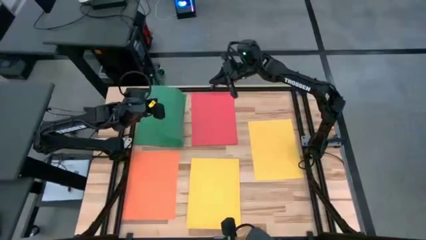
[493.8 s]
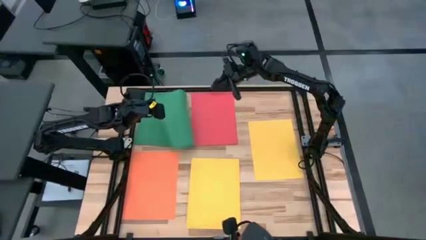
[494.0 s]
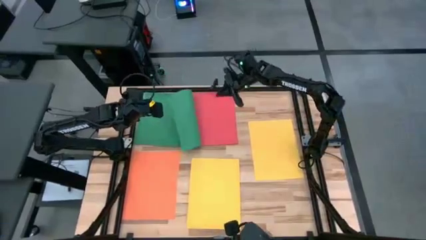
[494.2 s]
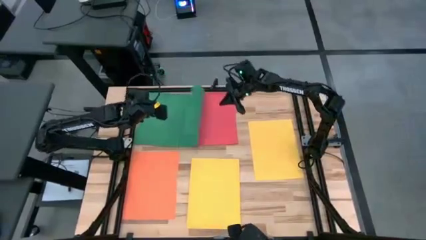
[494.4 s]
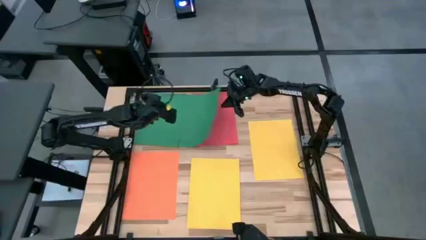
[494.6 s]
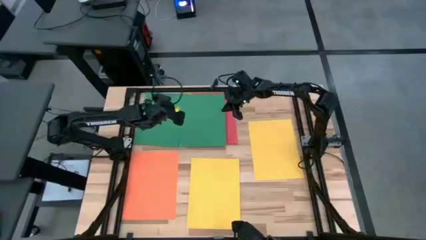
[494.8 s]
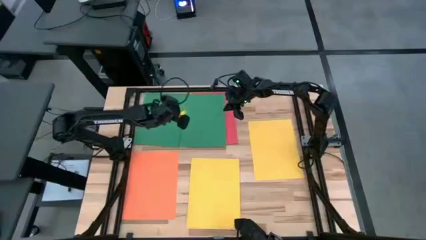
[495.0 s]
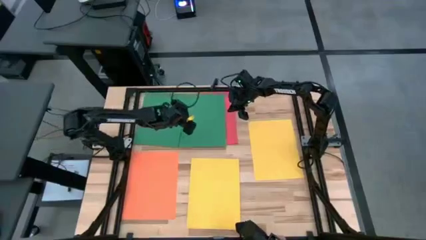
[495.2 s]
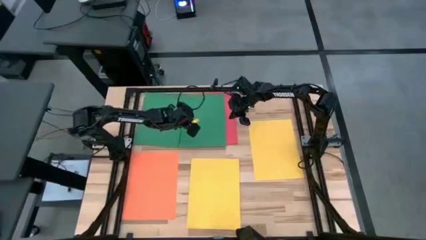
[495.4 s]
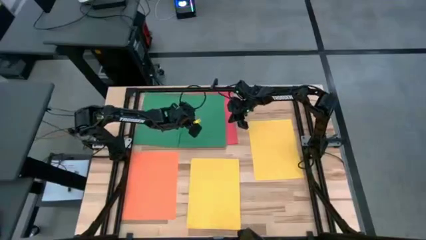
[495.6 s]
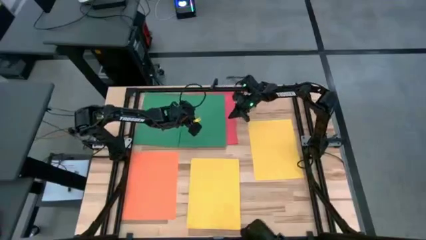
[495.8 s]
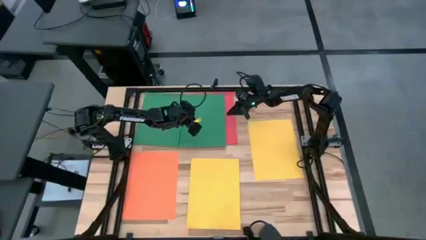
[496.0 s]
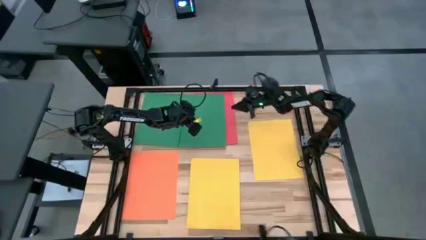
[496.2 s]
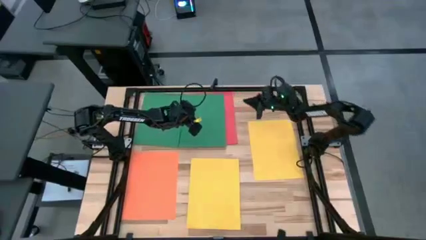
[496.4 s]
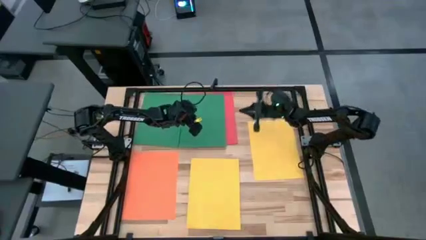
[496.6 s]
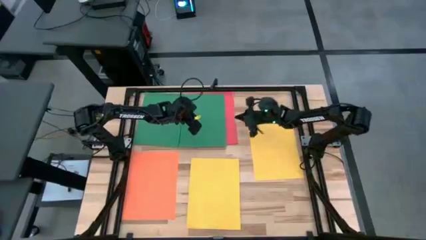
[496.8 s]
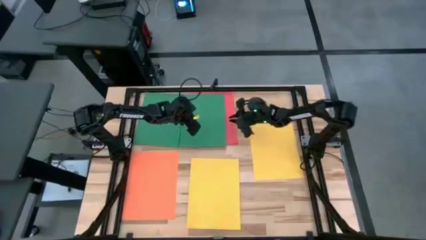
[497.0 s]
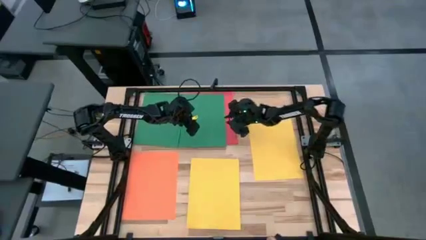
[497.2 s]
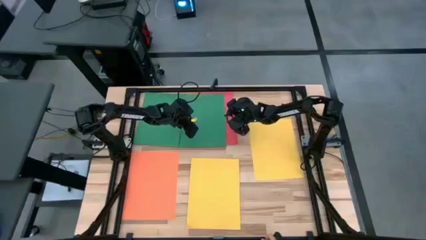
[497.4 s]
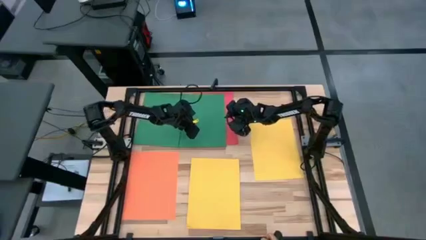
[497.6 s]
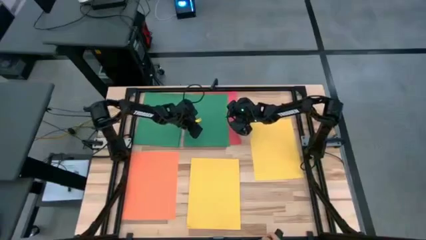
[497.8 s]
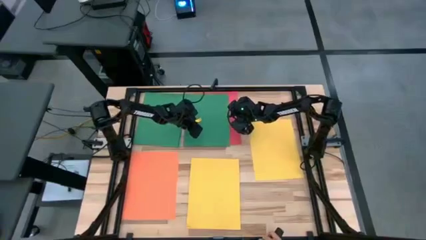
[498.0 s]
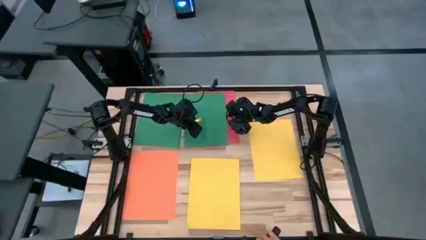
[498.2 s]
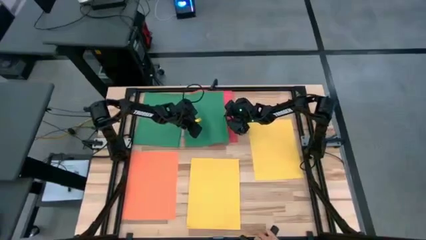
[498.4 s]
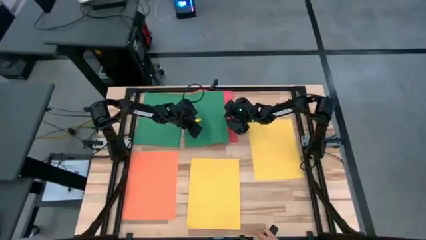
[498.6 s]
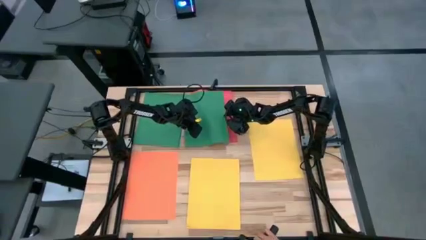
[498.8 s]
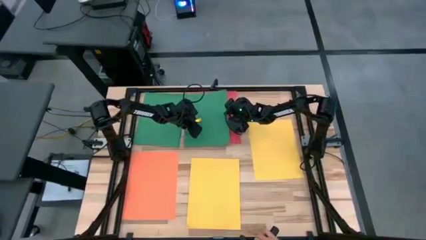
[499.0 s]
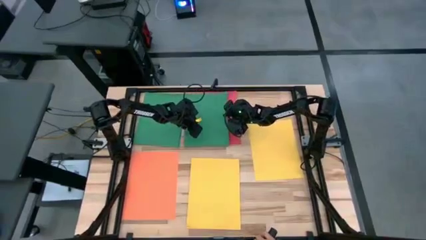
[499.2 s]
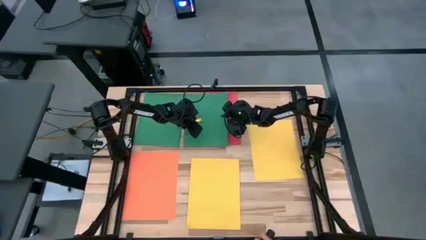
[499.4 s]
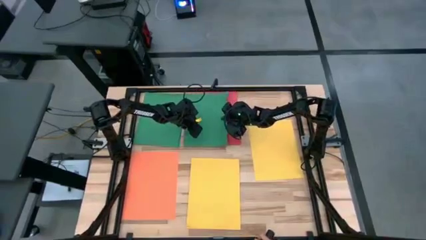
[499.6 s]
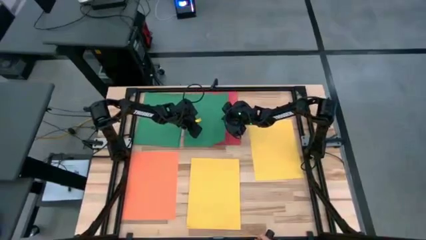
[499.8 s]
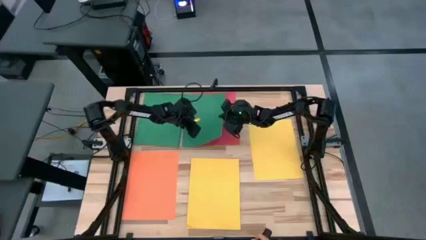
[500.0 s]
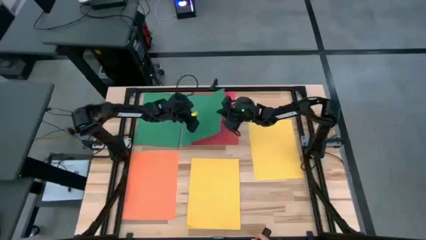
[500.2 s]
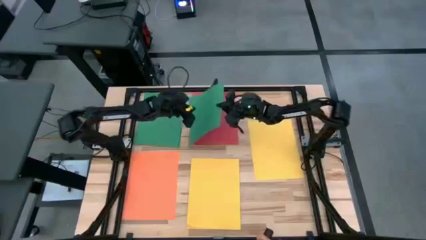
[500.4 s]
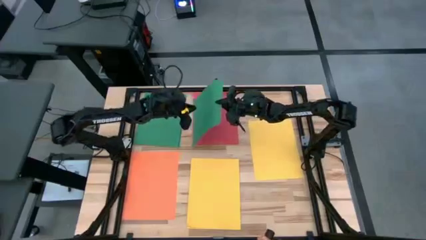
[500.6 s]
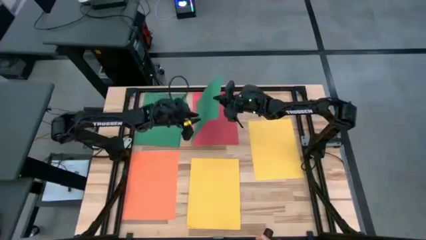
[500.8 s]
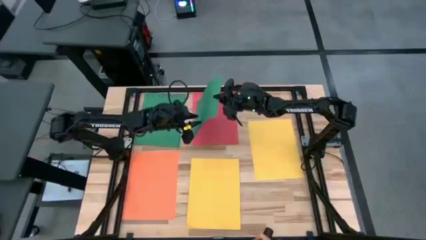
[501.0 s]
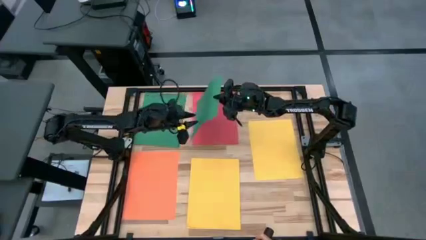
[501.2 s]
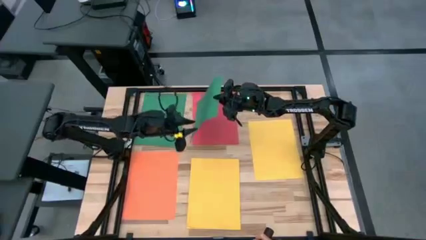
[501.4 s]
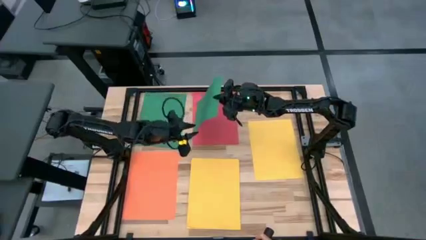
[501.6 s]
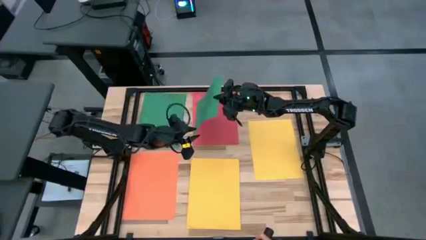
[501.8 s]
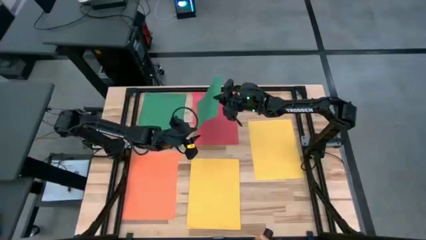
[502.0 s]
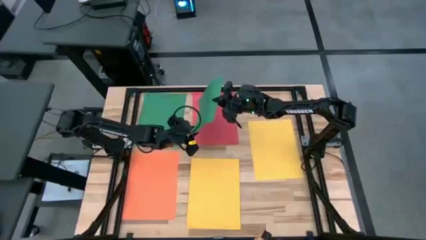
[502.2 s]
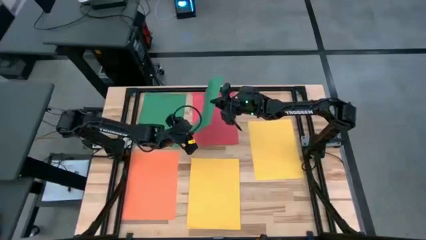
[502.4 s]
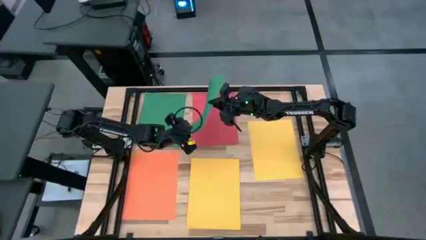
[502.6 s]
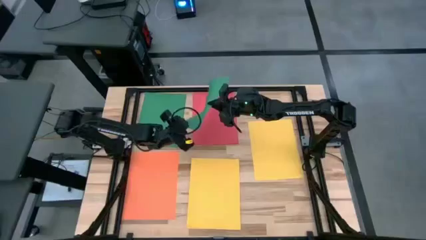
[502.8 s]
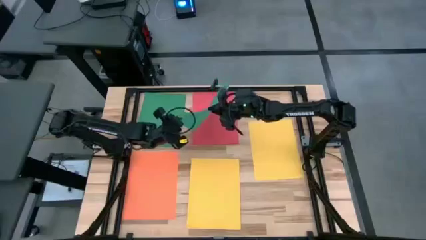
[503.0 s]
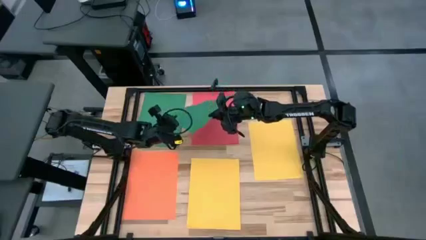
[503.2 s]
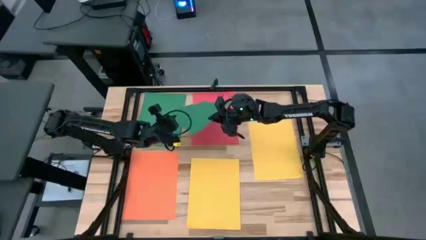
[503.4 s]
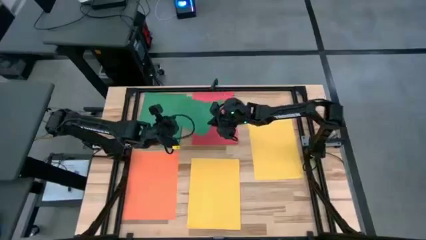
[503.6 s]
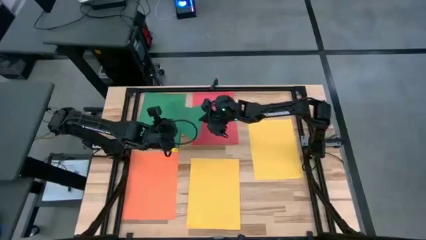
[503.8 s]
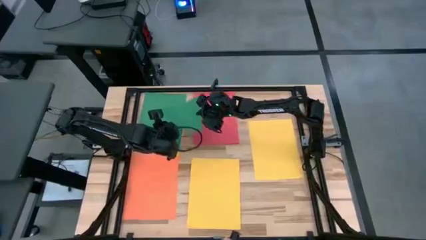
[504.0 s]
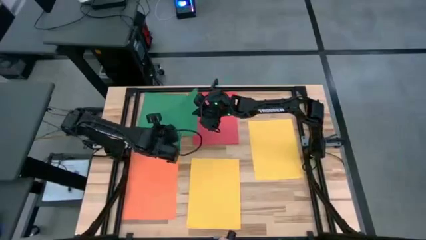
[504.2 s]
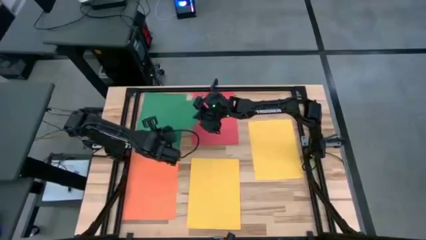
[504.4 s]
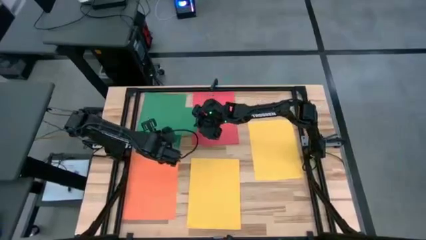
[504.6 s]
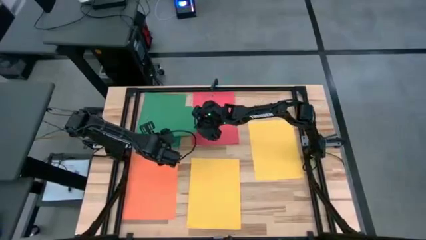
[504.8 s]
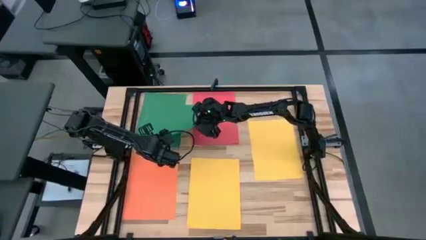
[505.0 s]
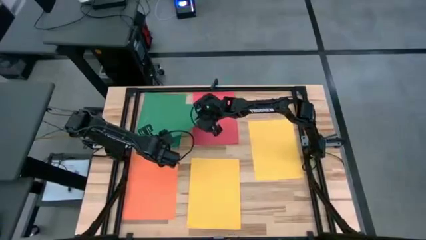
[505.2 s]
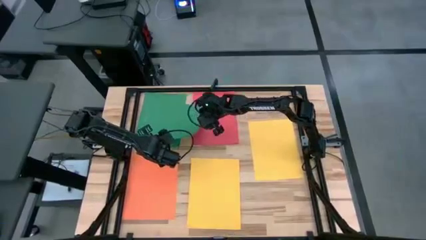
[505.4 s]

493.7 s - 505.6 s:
Task: Organize paper
Stack the green paper on top of the green paper

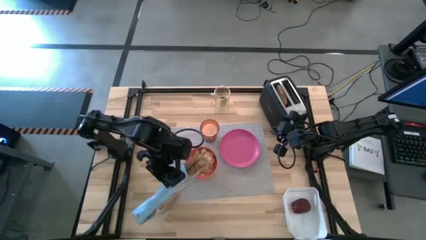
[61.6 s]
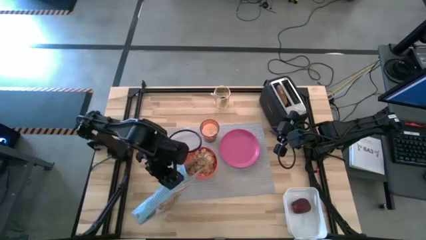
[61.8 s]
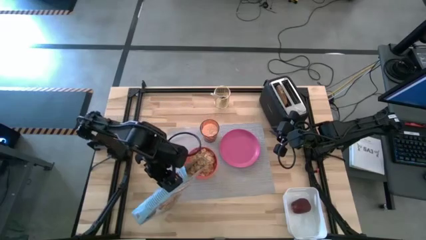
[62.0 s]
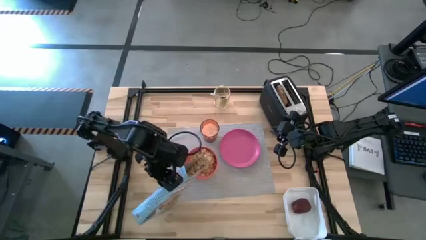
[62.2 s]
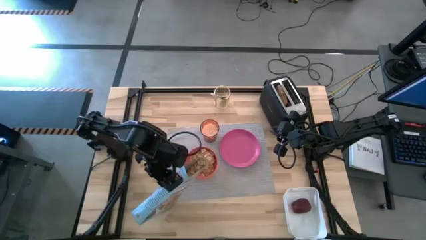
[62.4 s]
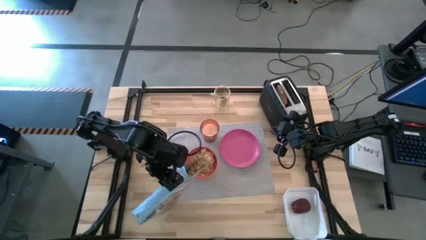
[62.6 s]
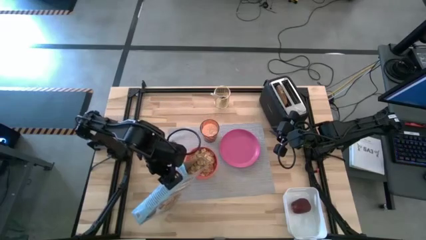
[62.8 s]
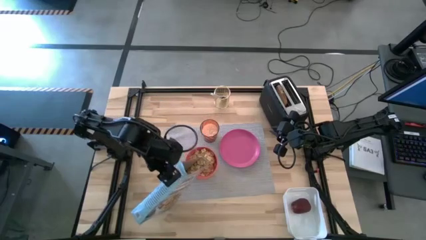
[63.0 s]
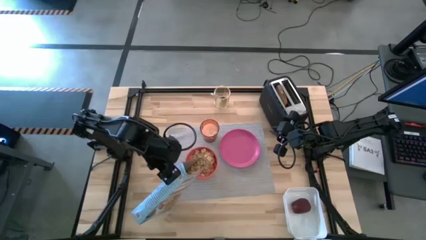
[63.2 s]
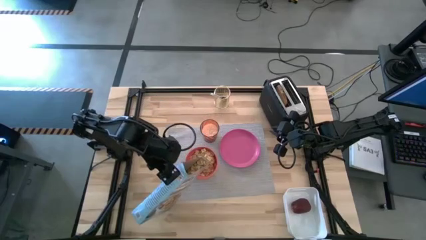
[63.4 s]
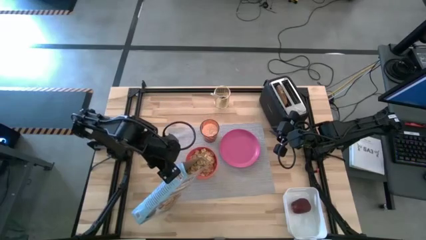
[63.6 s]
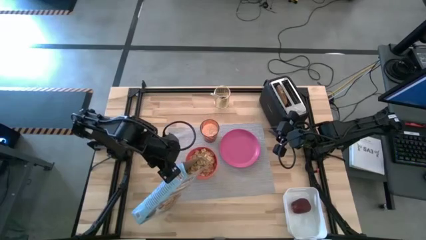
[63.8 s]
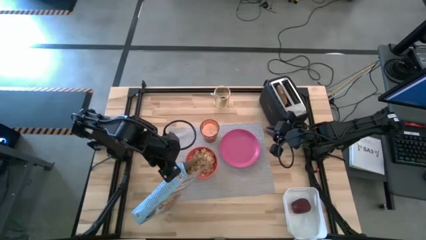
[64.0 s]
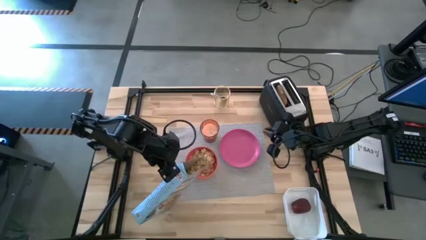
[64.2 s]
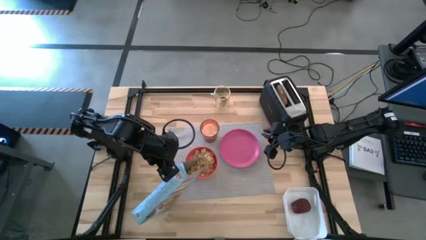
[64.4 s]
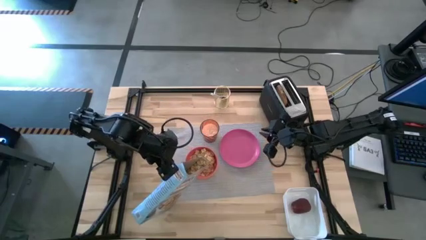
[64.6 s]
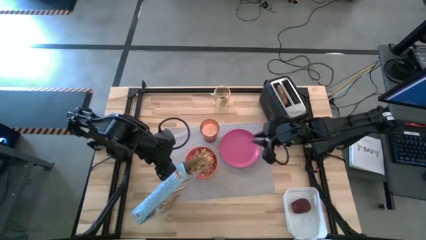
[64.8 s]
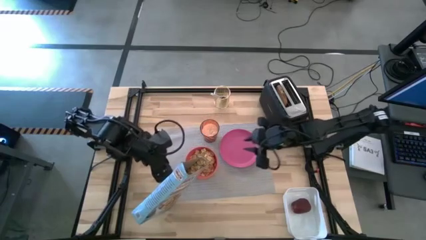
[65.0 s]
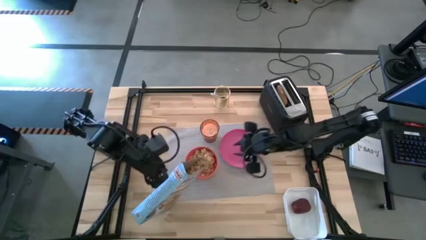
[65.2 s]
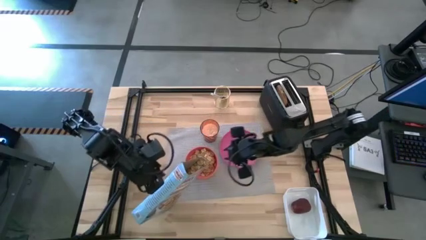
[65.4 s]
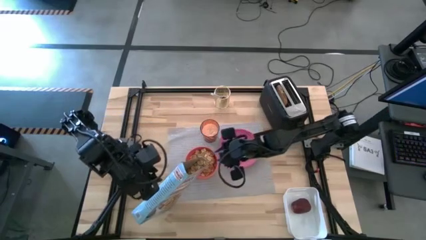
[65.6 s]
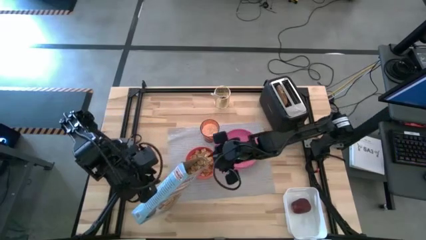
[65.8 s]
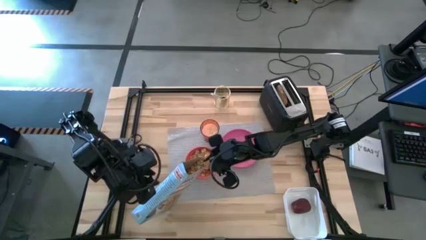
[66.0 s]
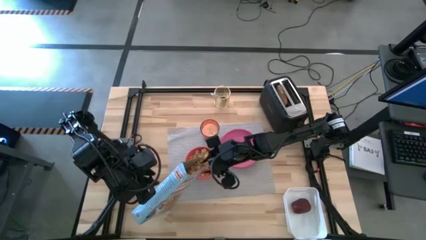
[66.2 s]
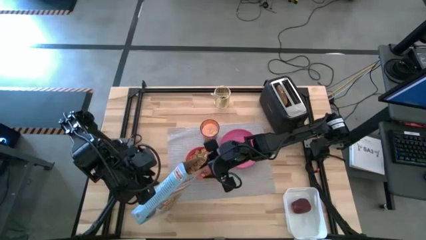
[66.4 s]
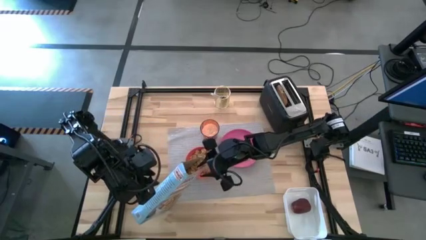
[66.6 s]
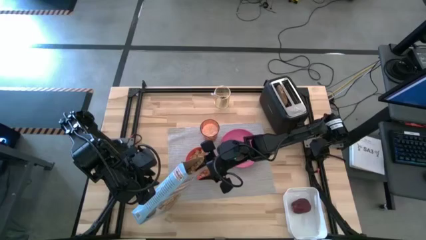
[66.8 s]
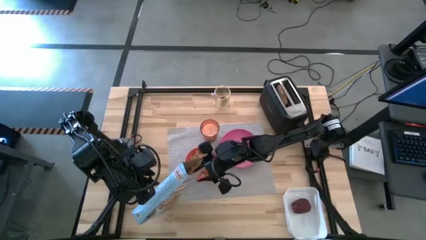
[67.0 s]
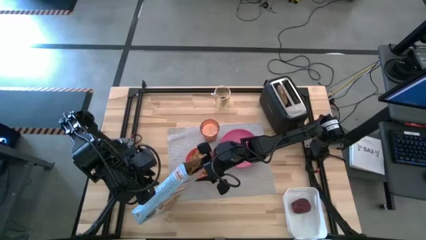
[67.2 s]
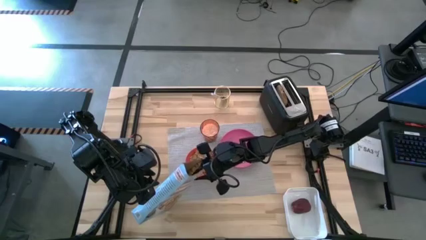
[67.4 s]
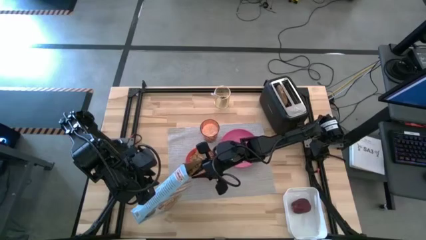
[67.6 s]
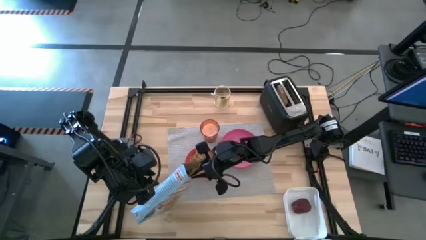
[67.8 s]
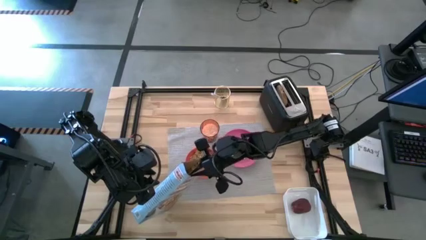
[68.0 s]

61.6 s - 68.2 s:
Task: Arrange a breakfast setting
Pour the cereal from the blue cereal box into the orange bowl
